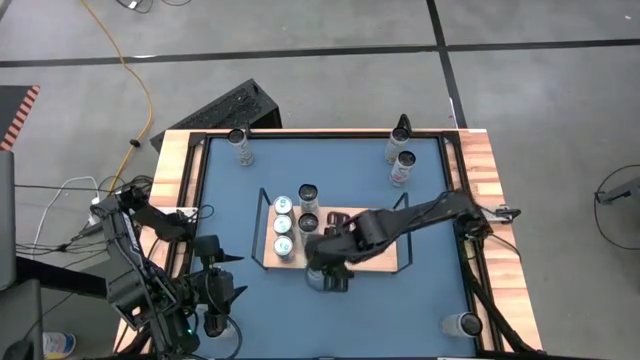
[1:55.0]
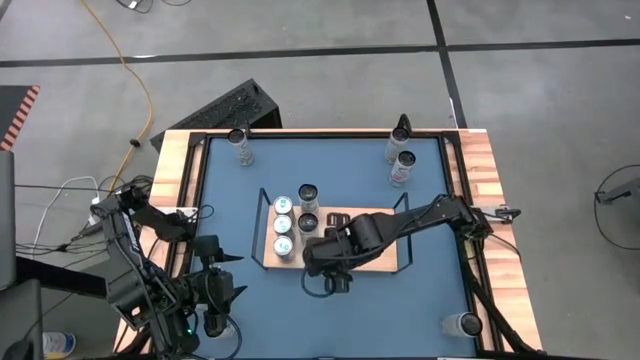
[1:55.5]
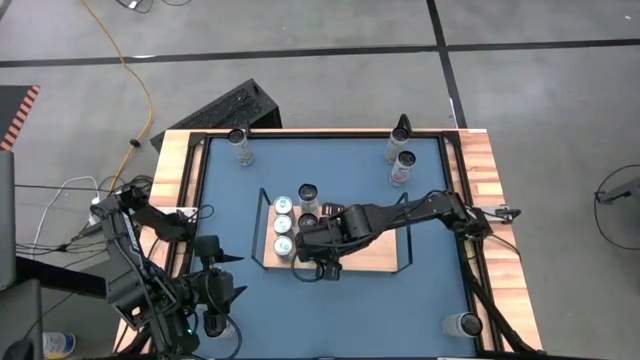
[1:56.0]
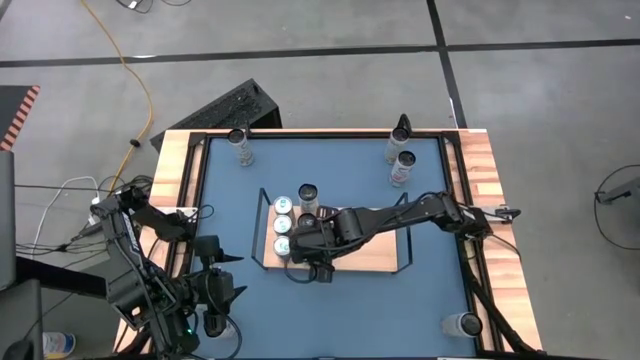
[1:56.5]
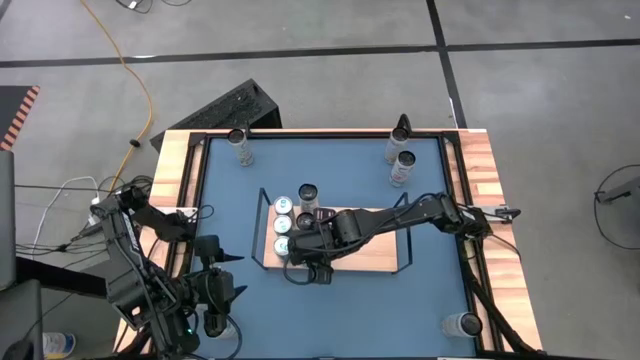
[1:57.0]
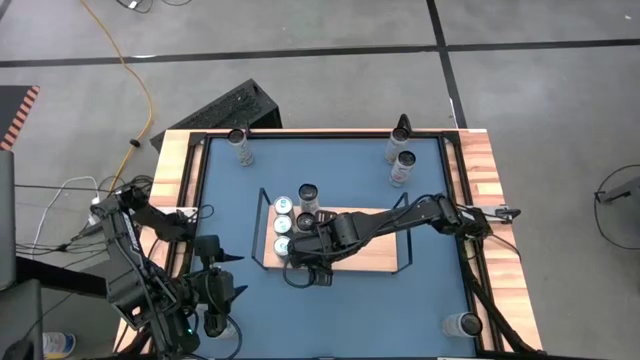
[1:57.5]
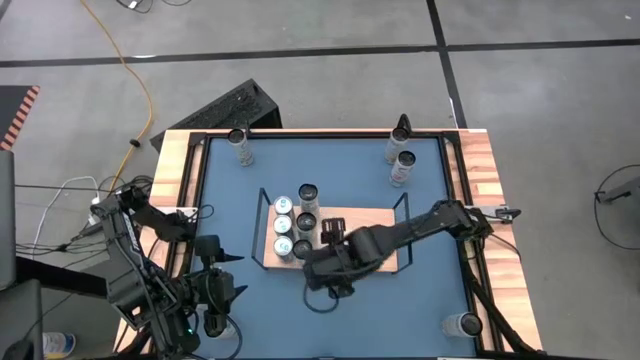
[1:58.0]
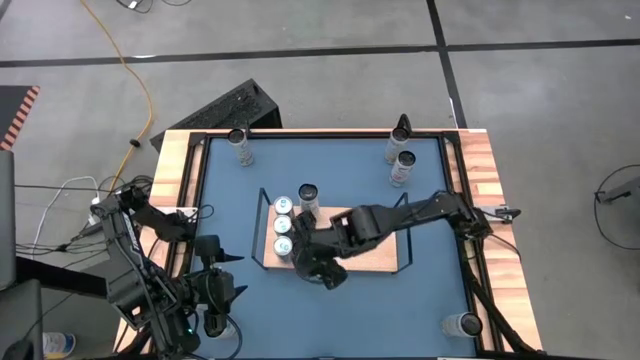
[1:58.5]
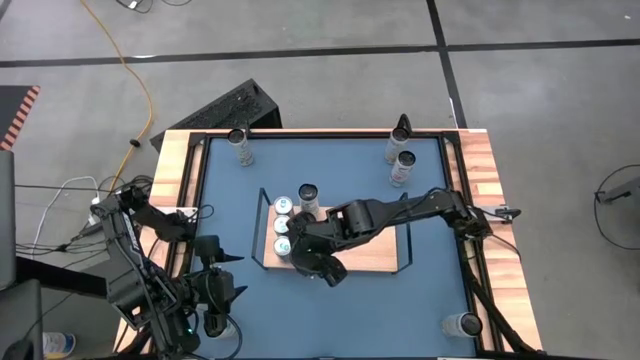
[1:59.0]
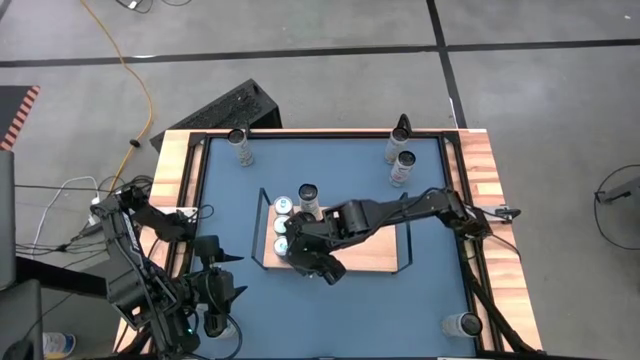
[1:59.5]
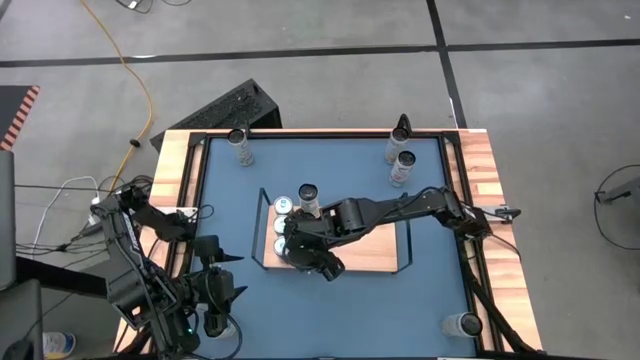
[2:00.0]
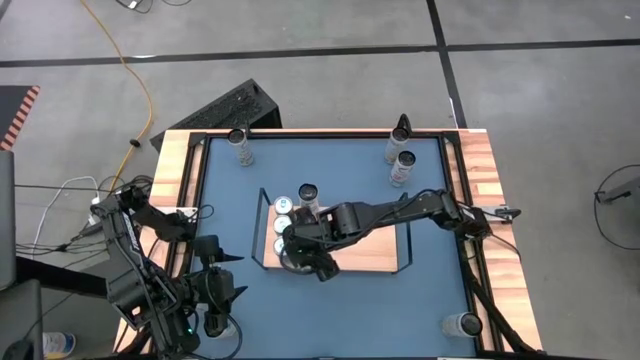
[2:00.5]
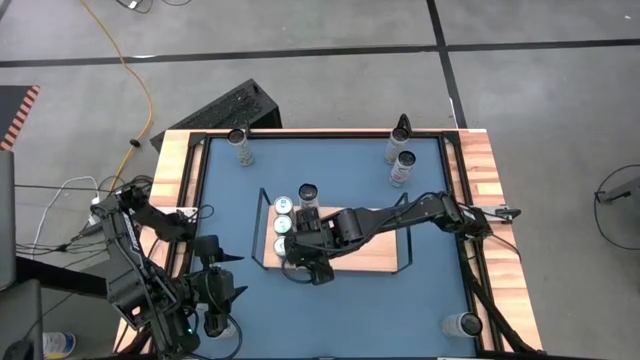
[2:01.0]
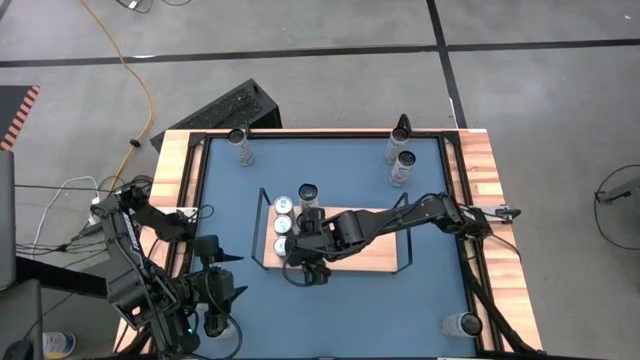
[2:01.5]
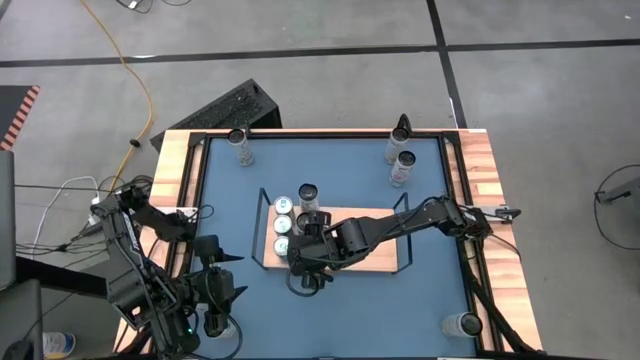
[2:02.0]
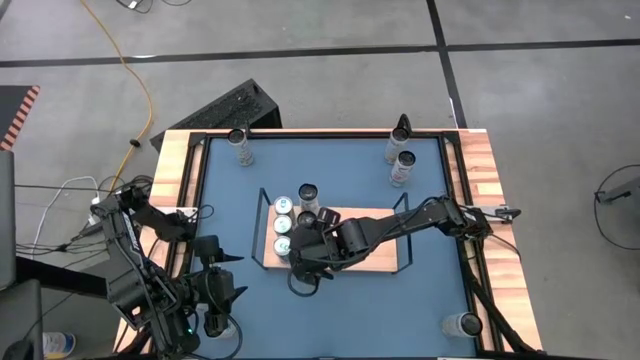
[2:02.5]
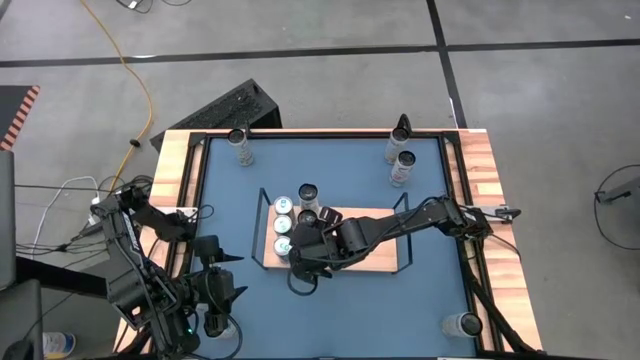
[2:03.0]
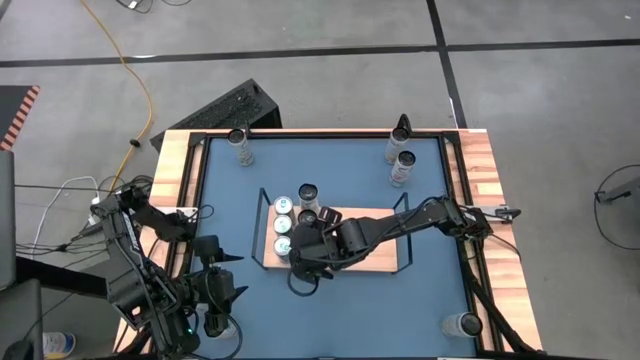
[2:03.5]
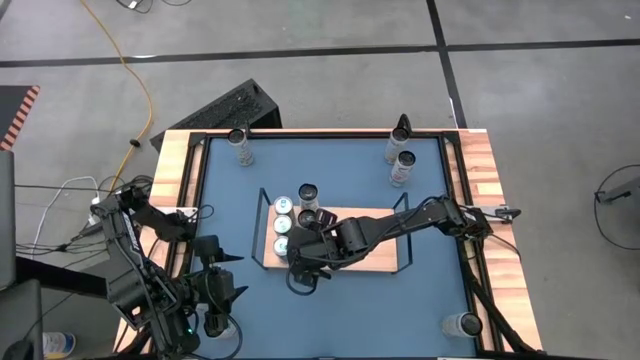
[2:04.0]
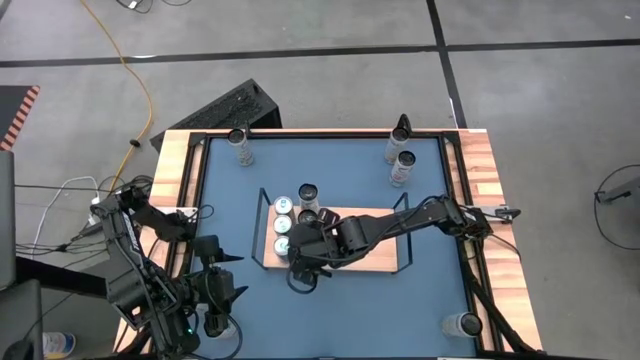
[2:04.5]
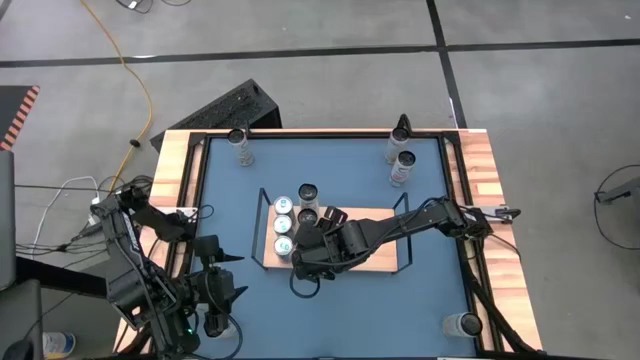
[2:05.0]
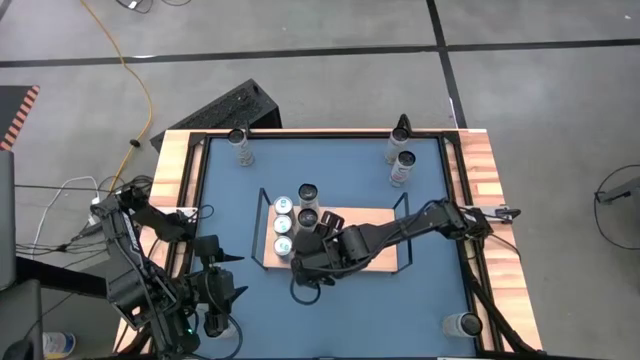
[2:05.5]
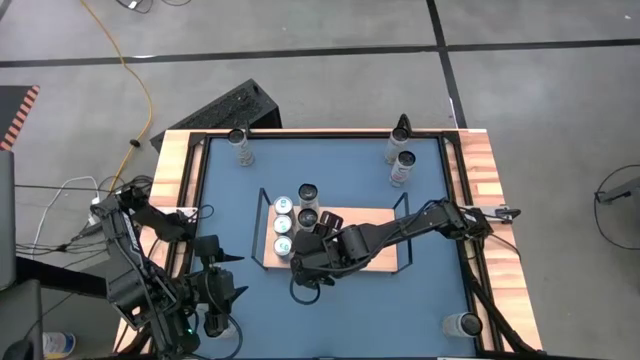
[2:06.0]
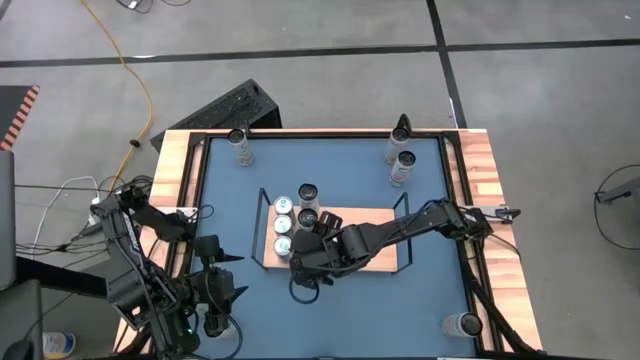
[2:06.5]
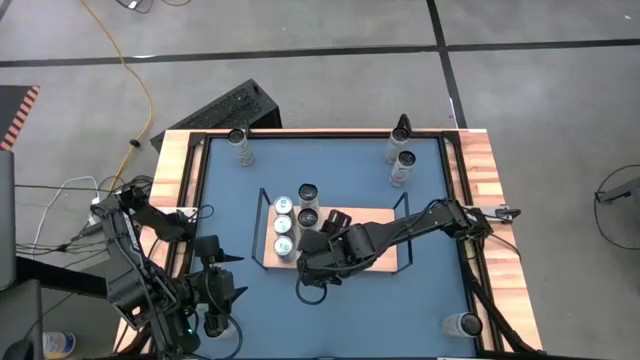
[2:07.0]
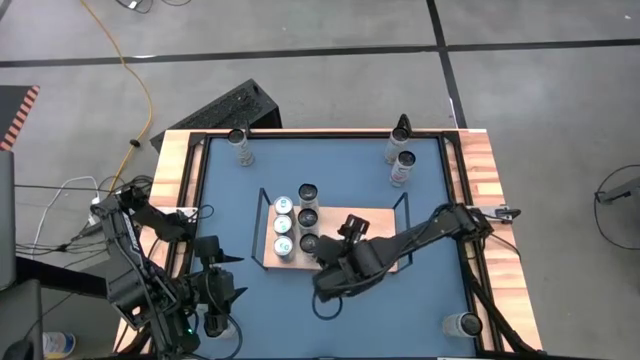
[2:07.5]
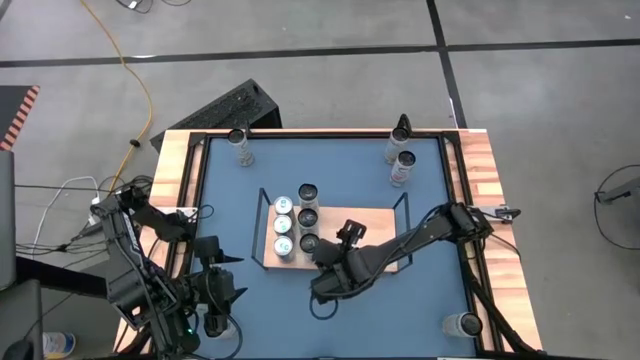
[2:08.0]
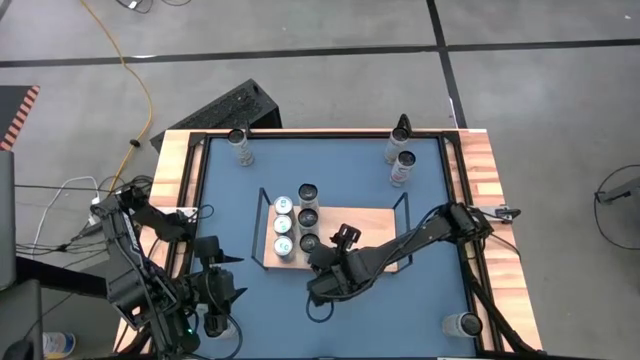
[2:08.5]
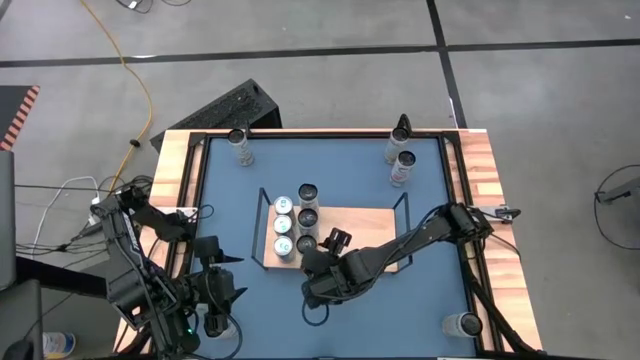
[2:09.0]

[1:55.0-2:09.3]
Task: Place canned beverage on shelf
Put the white blue soda can on the shelf aligned with the other blue soda cans

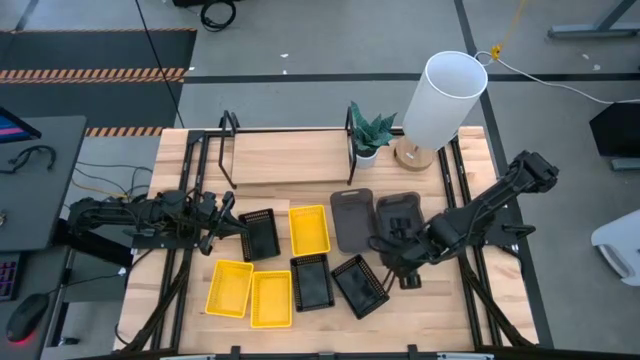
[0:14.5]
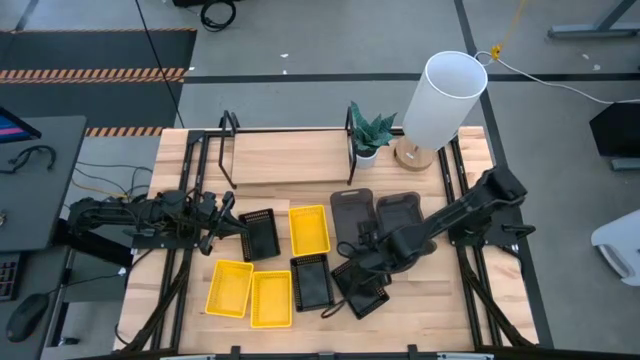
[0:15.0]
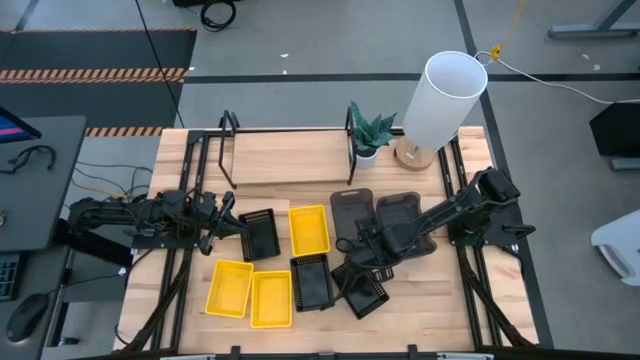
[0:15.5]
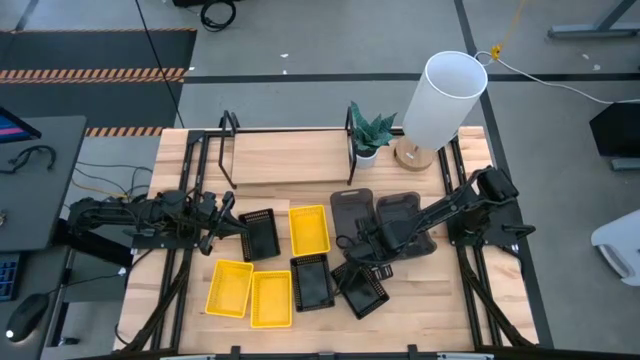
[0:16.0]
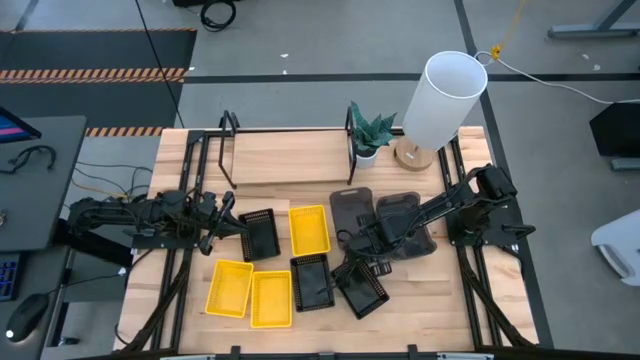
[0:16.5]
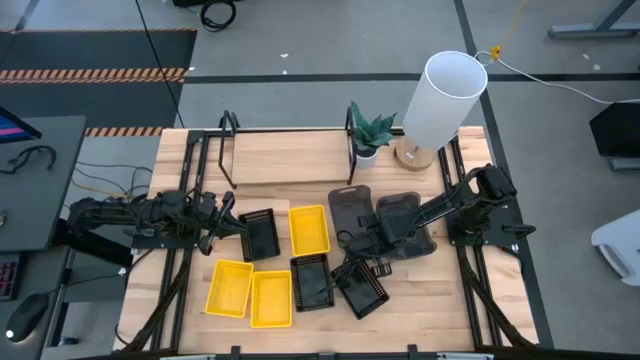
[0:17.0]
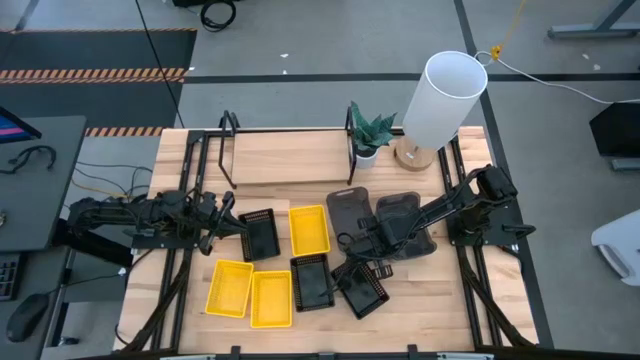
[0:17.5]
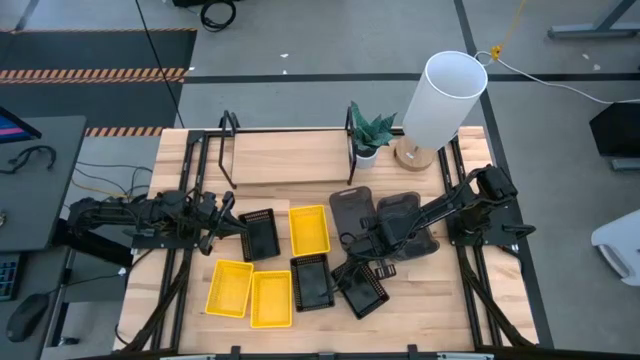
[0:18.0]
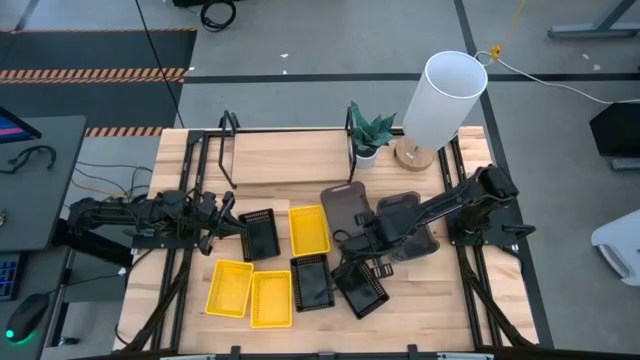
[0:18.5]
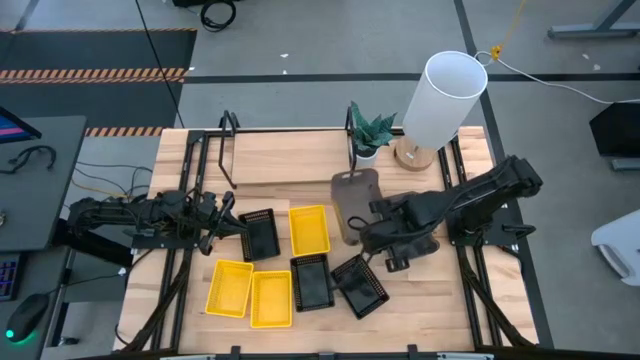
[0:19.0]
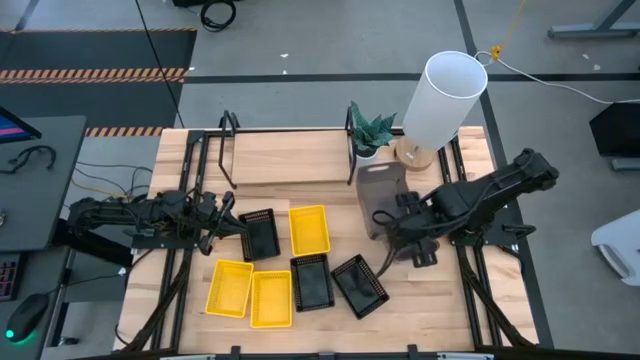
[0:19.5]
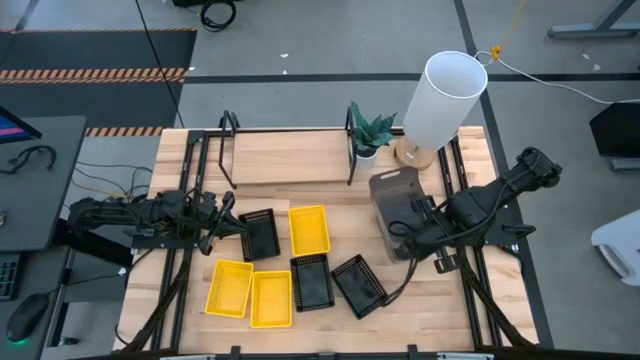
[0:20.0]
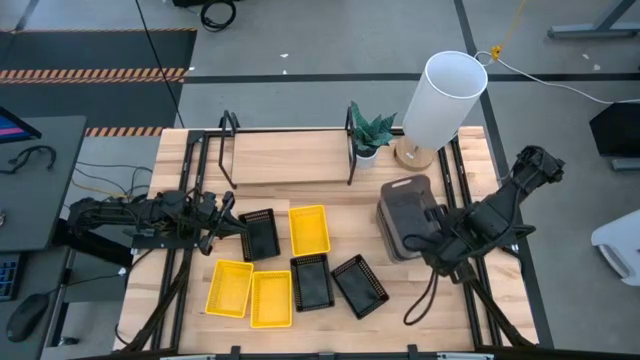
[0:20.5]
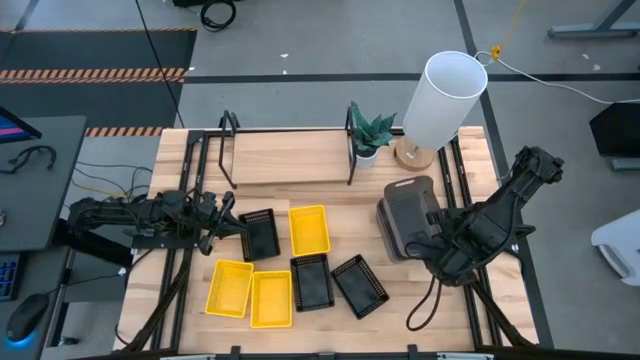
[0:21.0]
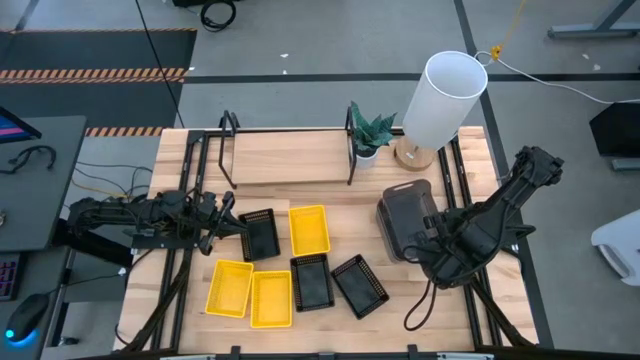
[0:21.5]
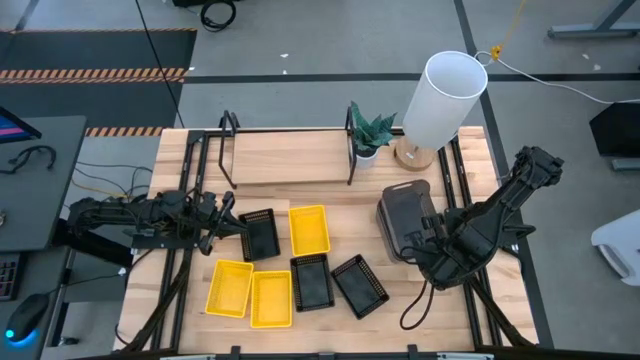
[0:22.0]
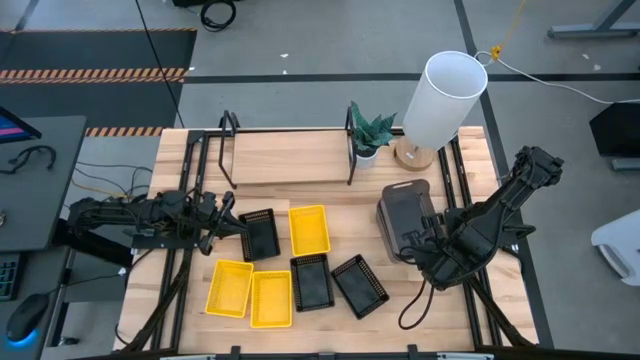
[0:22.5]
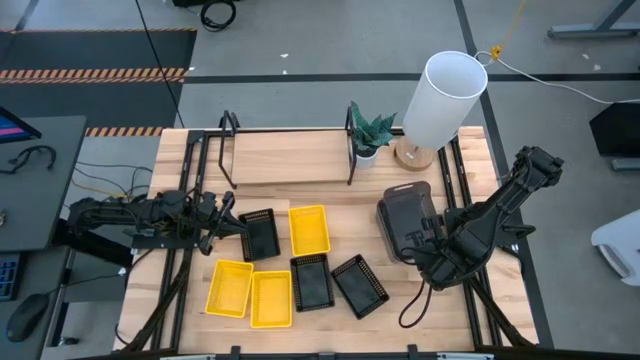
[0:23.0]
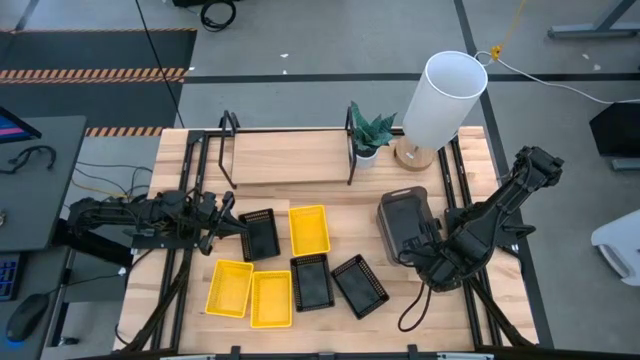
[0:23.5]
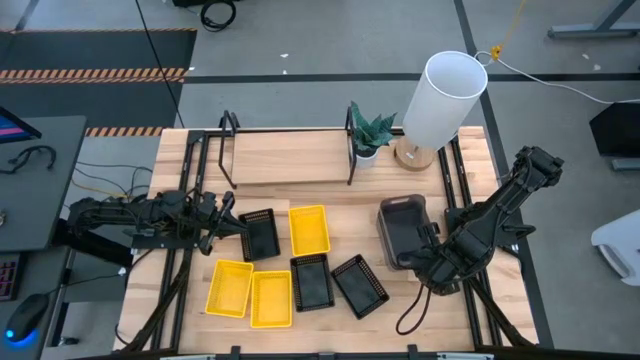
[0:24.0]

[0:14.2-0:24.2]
Task: Stack baskets on shelf by color
Stack the left gray bin on top of the right gray bins
